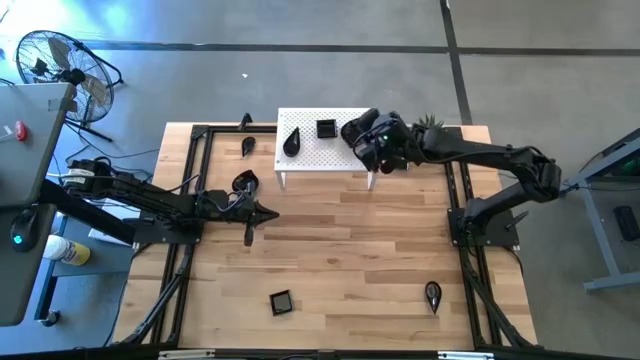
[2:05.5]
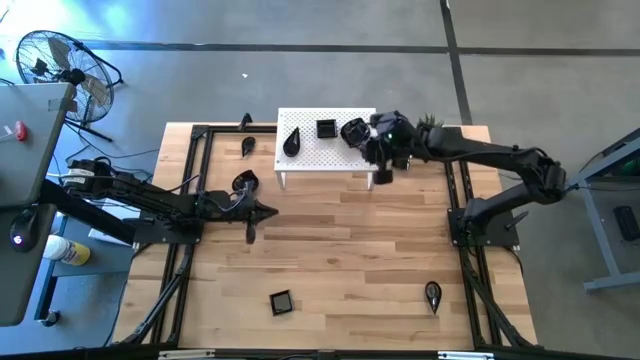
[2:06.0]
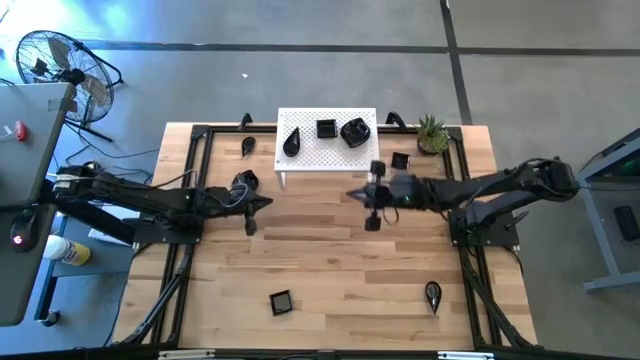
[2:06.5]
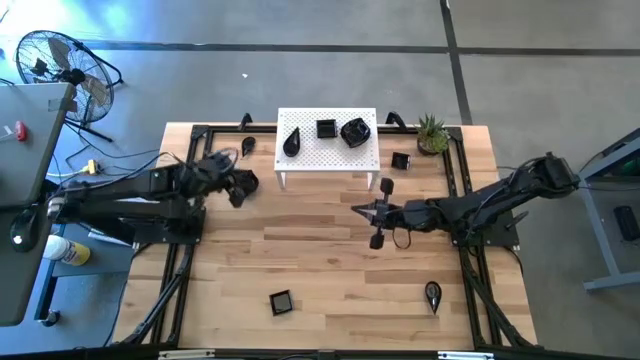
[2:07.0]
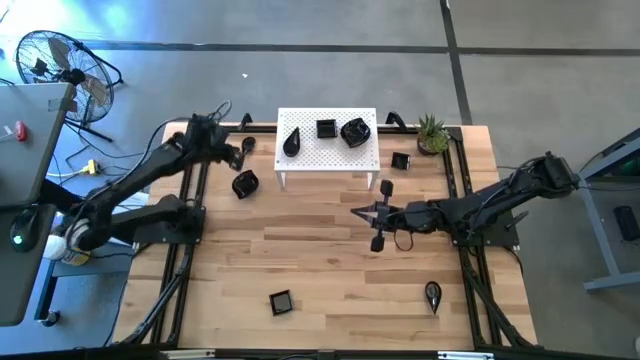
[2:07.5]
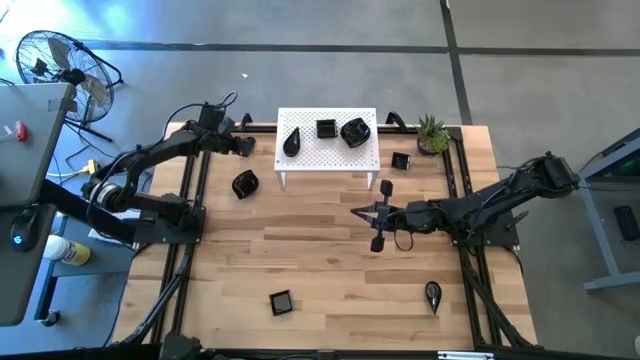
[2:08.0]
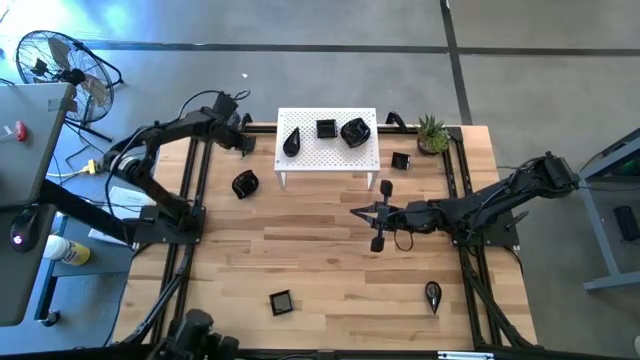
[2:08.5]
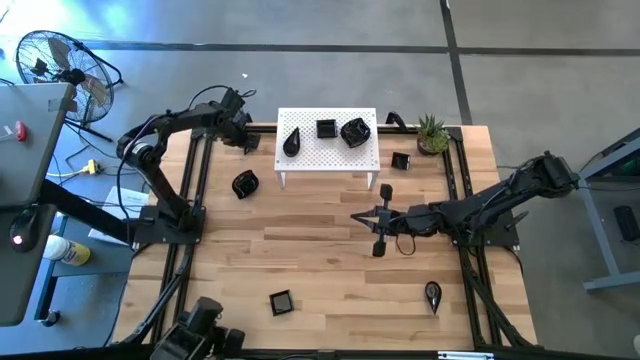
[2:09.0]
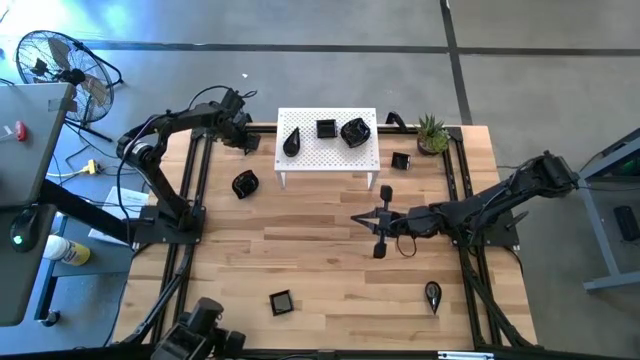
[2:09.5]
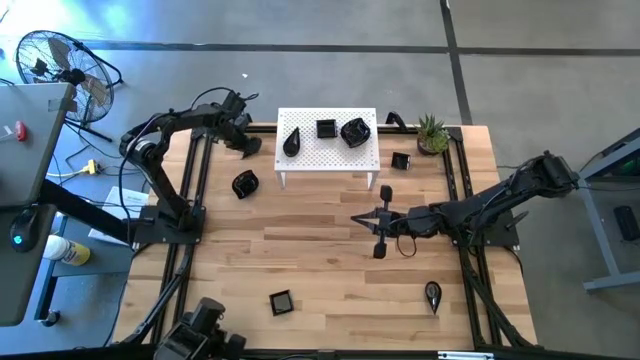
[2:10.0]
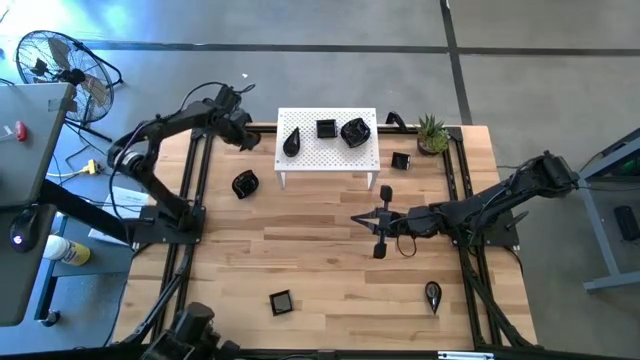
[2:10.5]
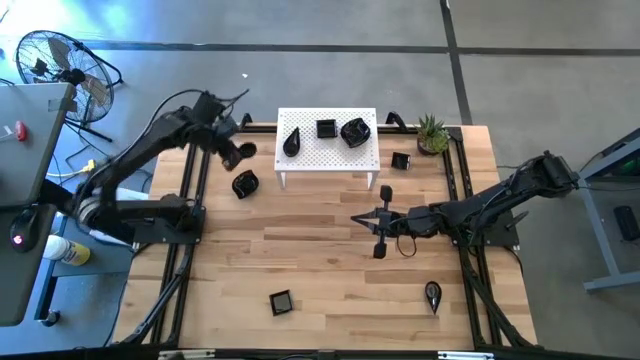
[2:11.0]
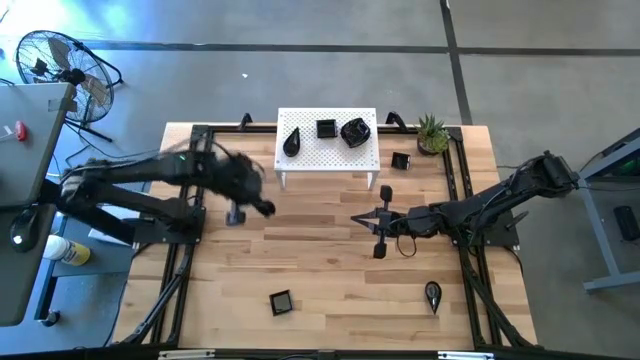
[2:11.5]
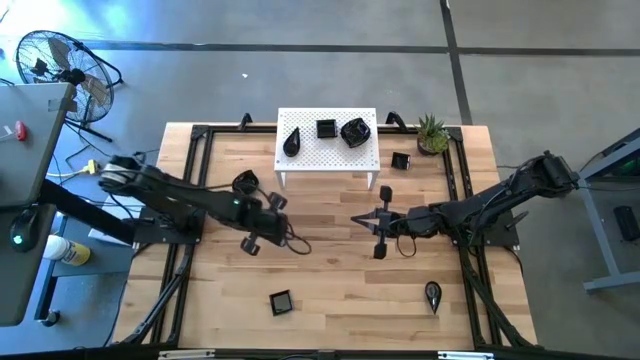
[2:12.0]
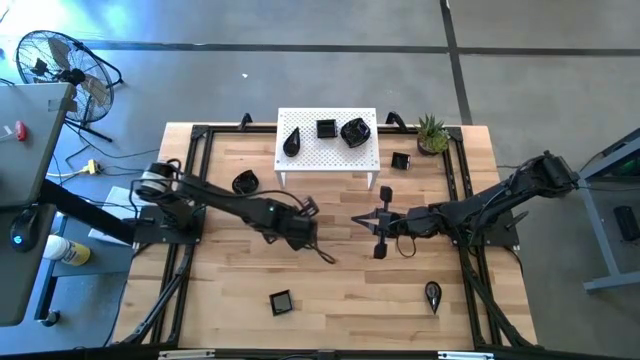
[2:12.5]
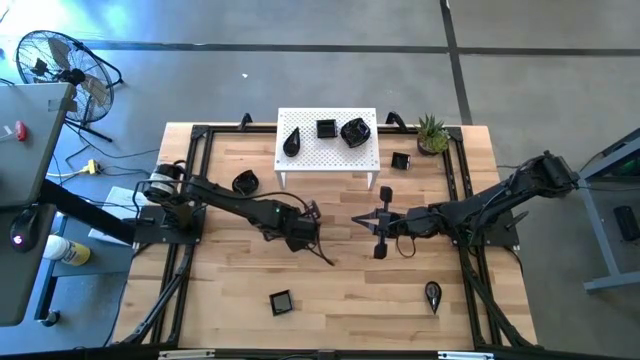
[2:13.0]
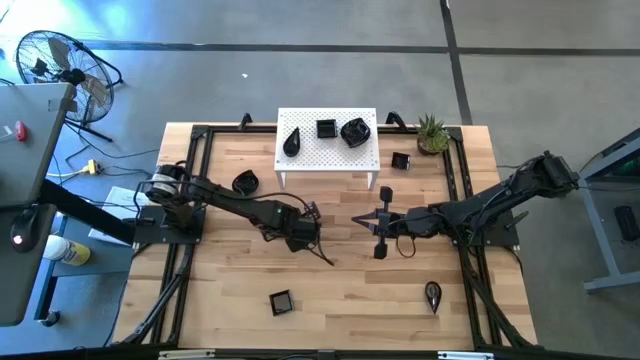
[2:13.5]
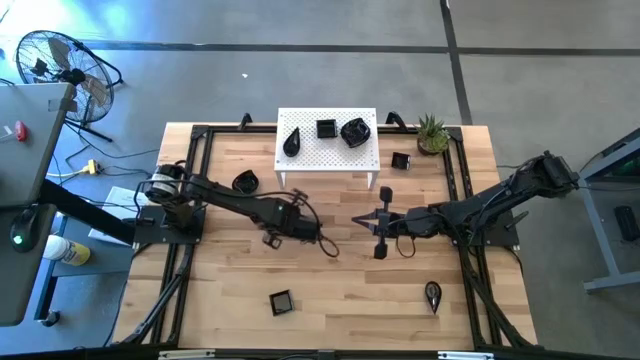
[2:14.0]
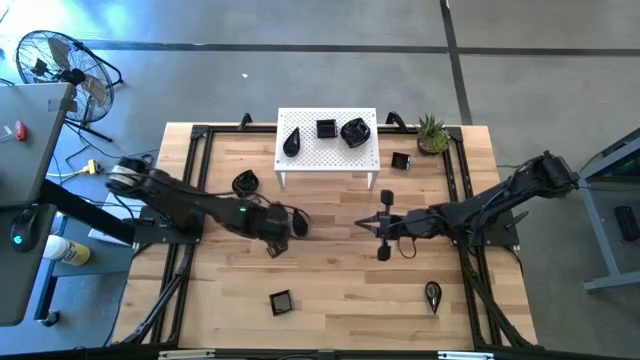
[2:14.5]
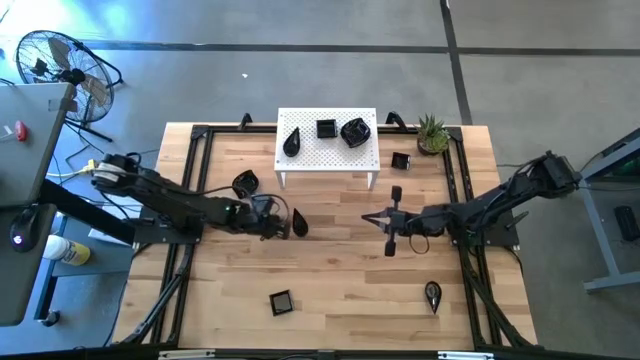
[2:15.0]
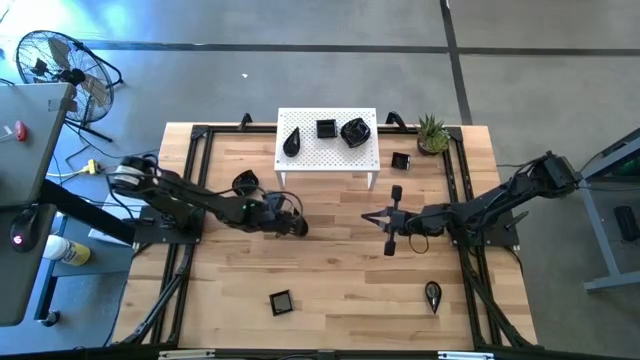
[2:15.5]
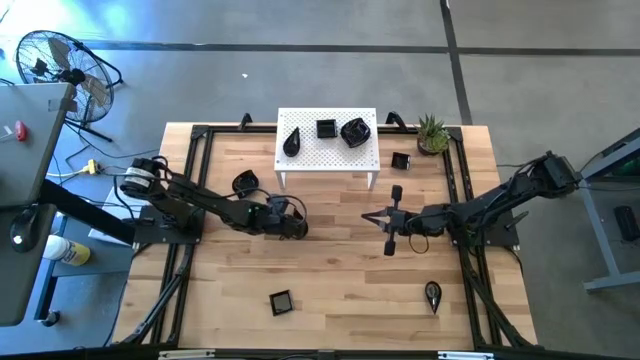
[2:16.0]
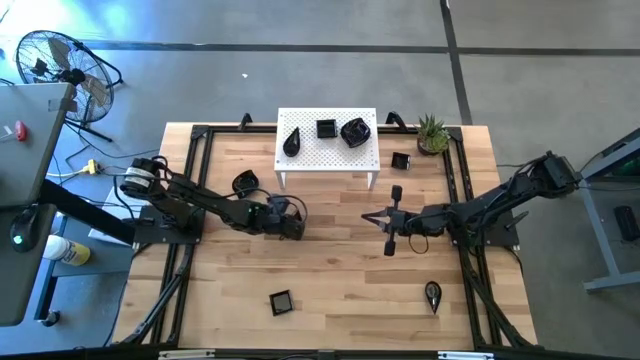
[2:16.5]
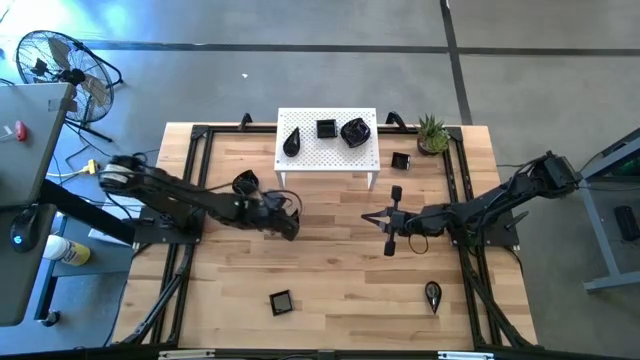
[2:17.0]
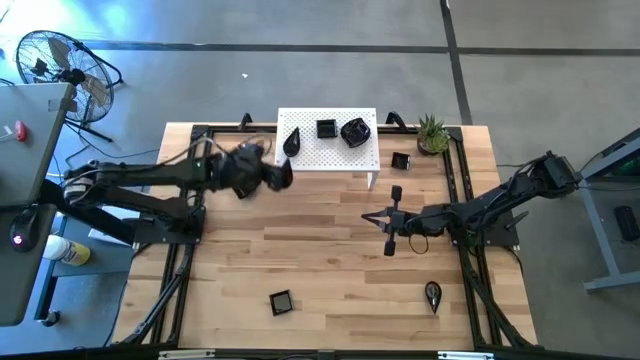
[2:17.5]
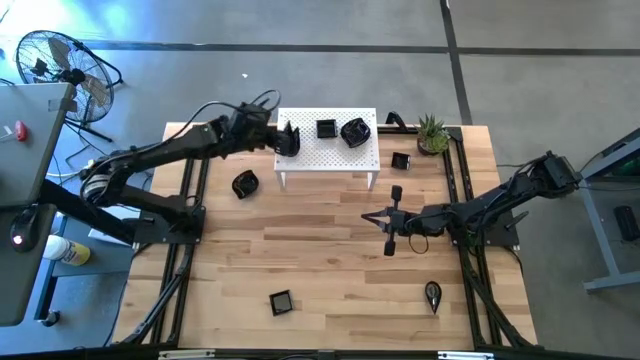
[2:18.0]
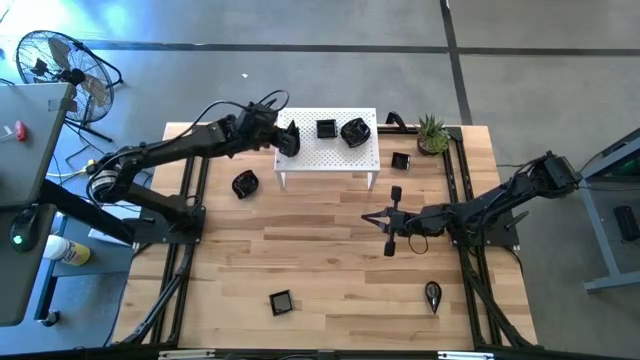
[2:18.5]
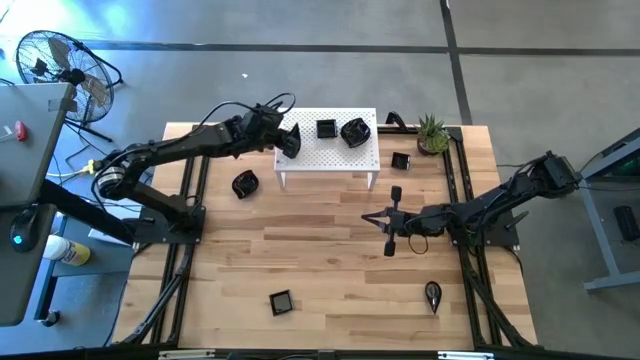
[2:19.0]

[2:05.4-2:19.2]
Task: Pick & Place Mini shaped plates
Stack the drop shaped bowl on top of the drop shaped bowls on the shelf

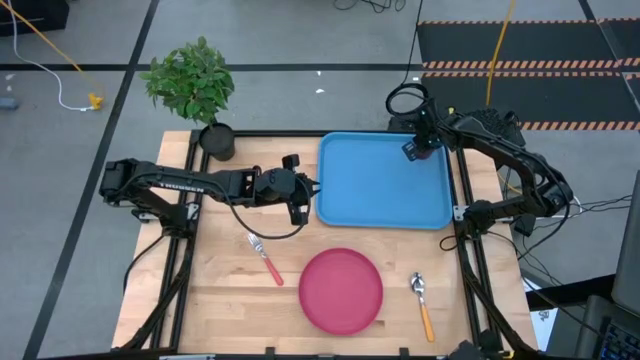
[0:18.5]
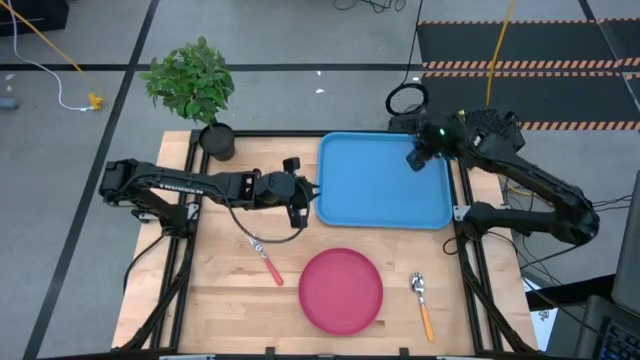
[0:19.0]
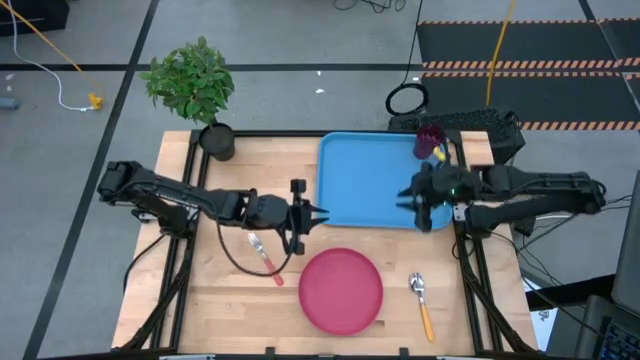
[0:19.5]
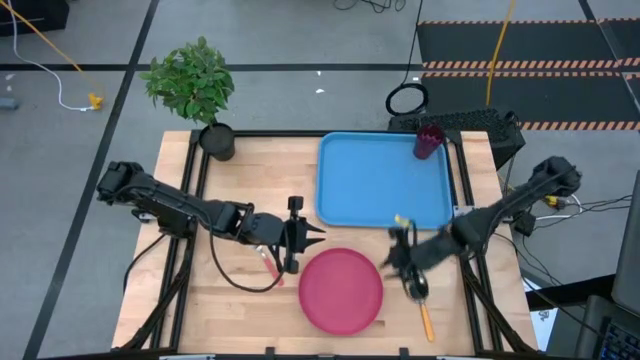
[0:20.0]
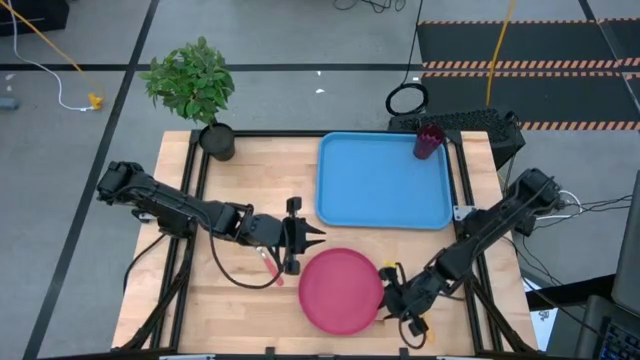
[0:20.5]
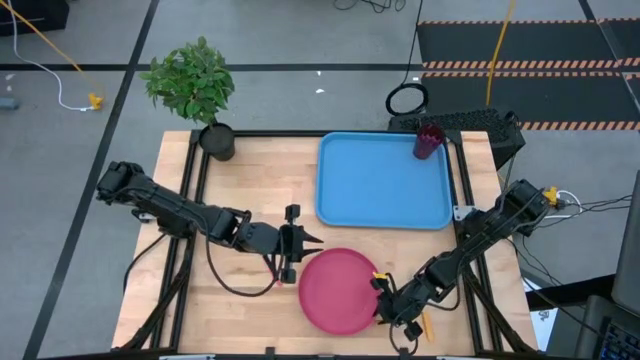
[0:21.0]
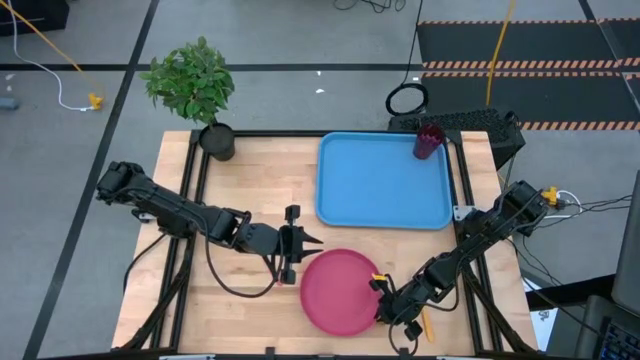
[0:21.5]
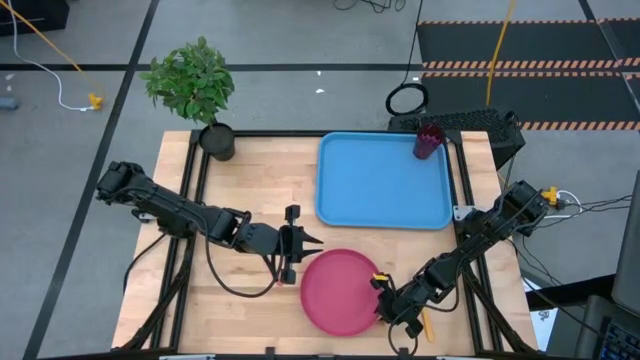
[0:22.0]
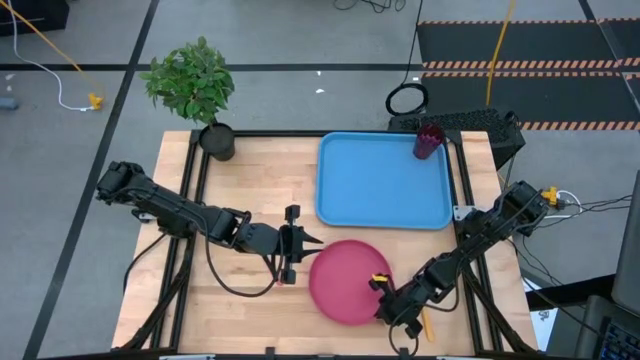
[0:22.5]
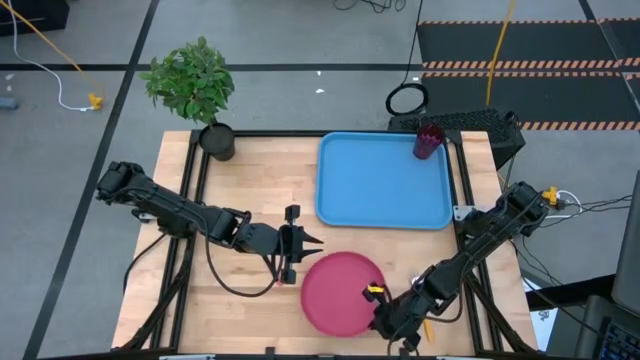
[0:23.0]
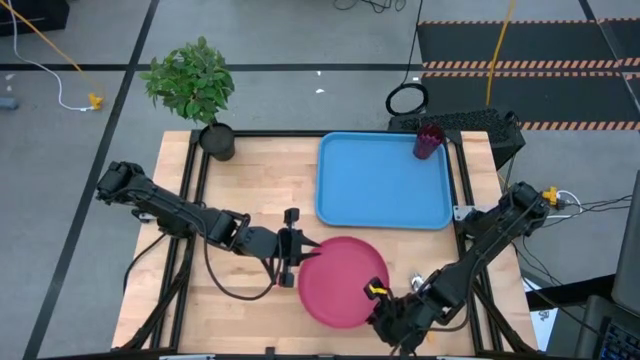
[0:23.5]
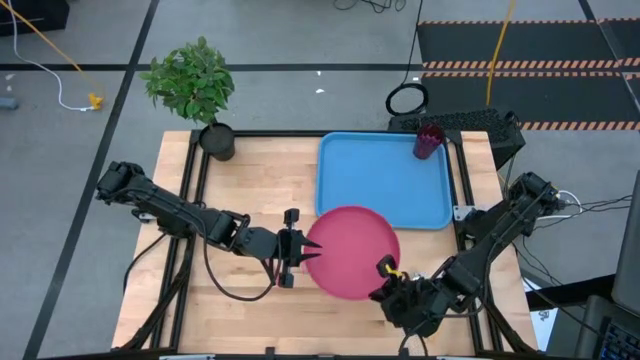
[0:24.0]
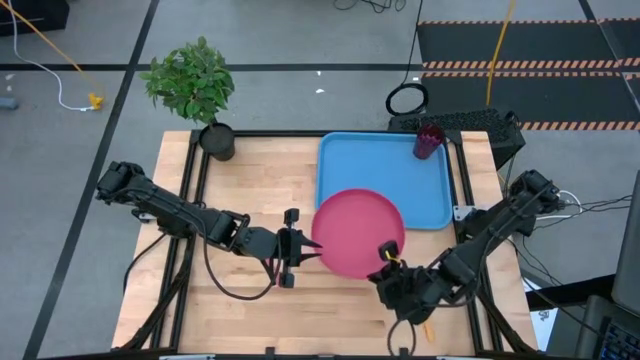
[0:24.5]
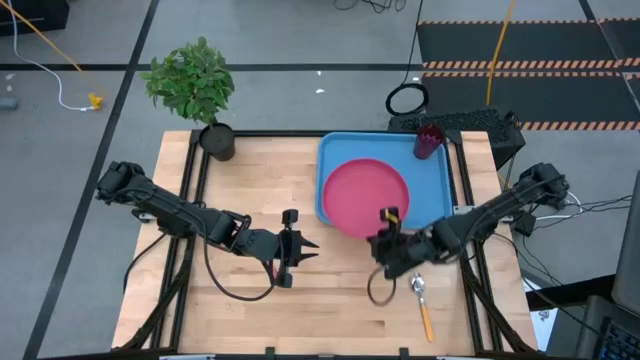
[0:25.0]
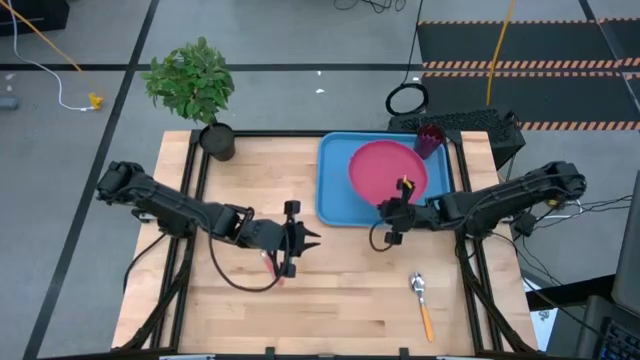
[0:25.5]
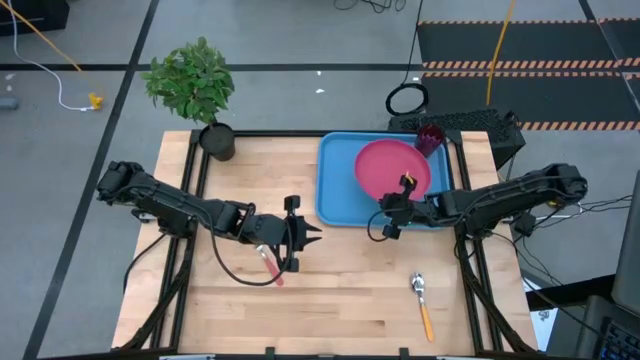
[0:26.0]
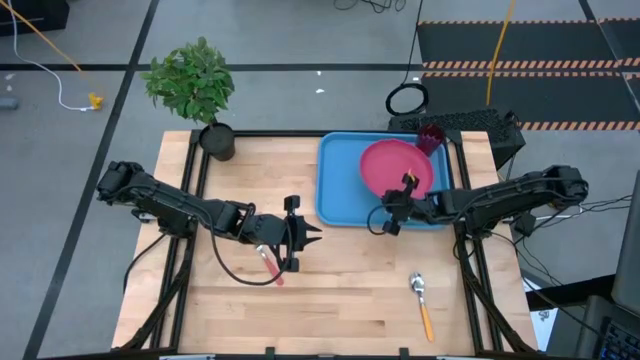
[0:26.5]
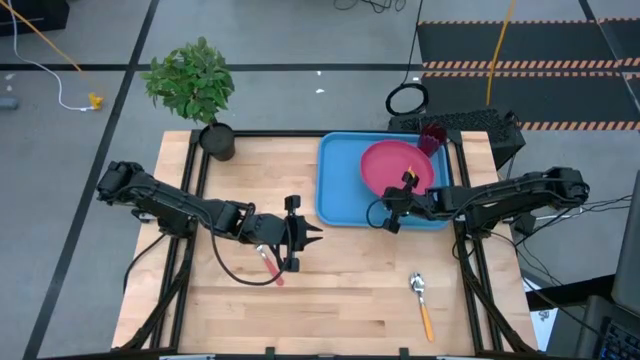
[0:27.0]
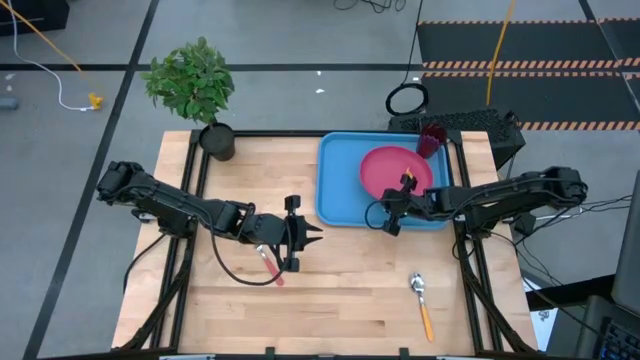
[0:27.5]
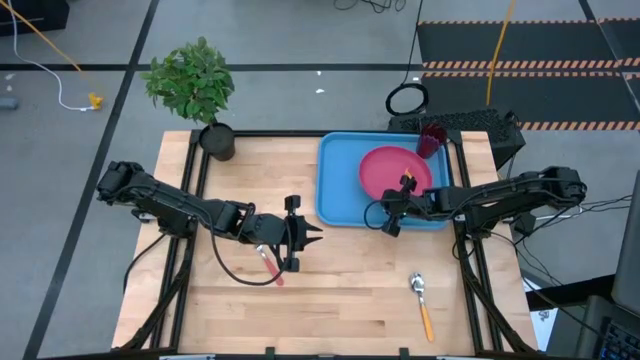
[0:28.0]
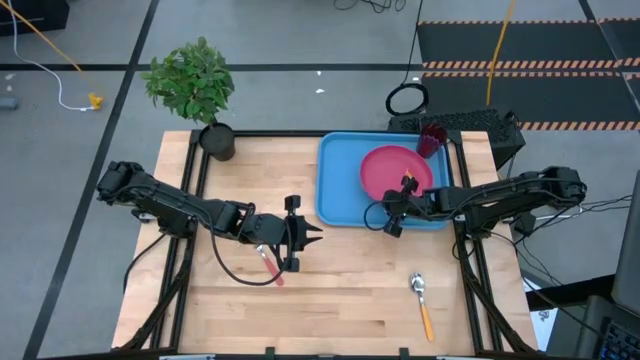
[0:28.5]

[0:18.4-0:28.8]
Task: Pick and place plate/cup/fork/spoon on tray
Put the pink plate on the blue tray to the bottom left of the red glass
